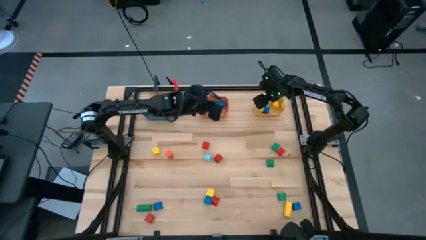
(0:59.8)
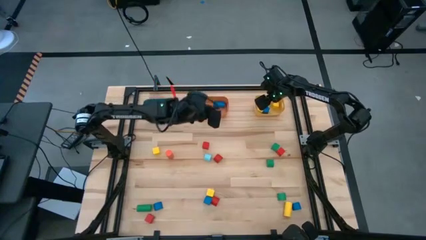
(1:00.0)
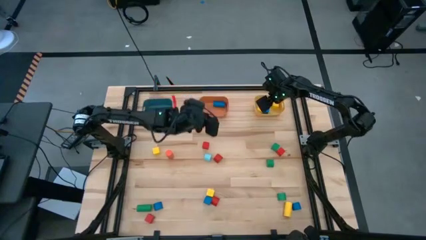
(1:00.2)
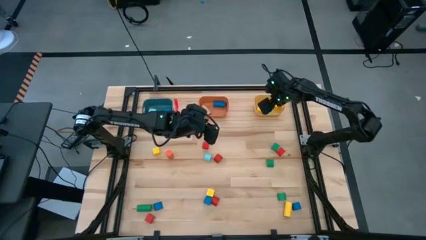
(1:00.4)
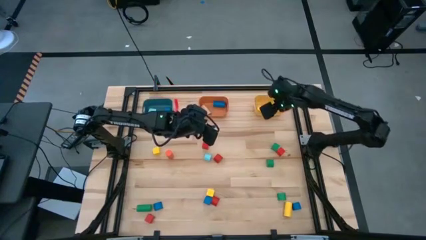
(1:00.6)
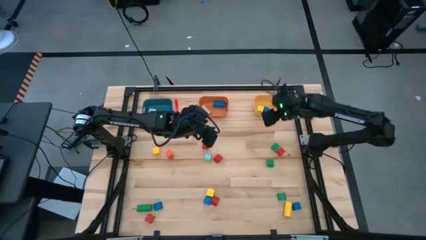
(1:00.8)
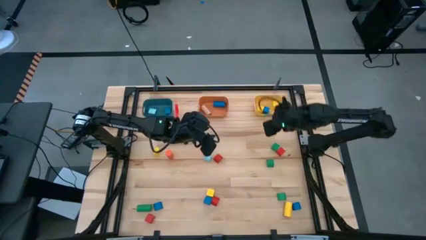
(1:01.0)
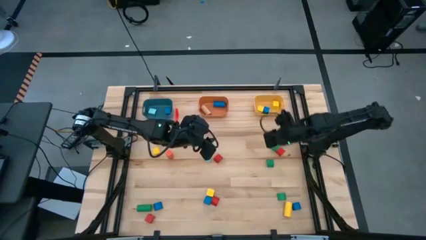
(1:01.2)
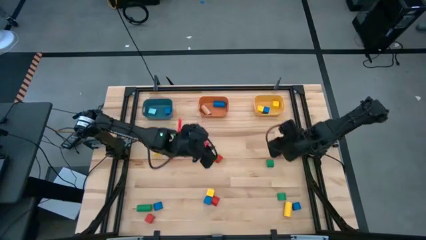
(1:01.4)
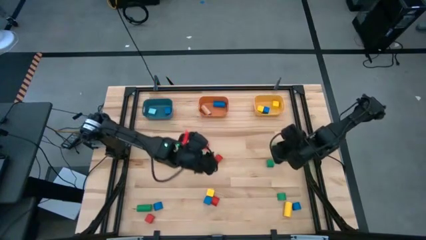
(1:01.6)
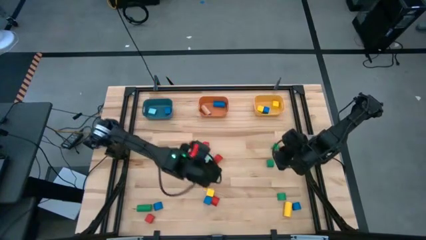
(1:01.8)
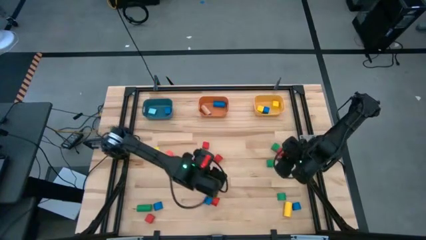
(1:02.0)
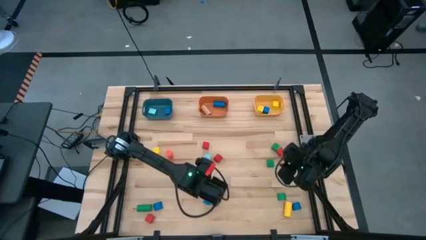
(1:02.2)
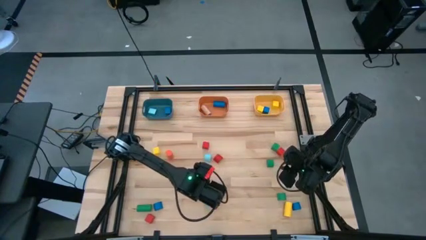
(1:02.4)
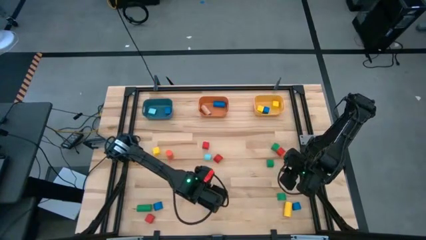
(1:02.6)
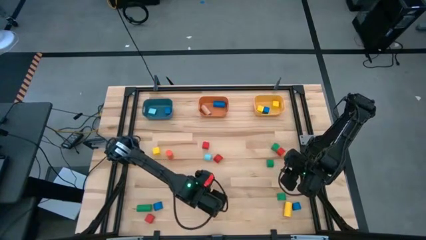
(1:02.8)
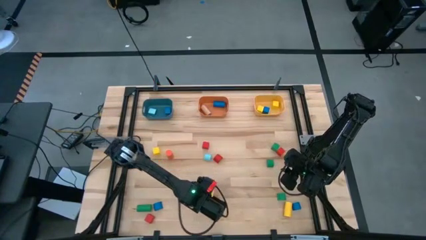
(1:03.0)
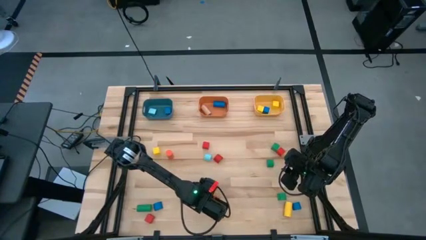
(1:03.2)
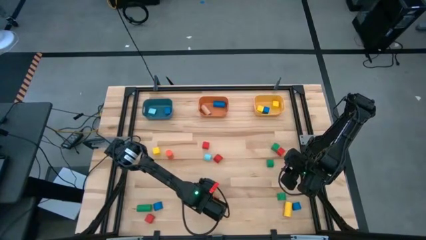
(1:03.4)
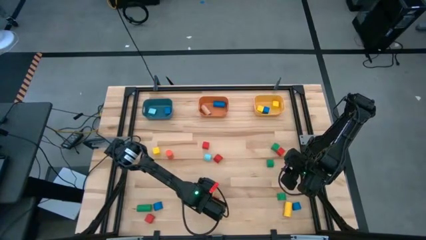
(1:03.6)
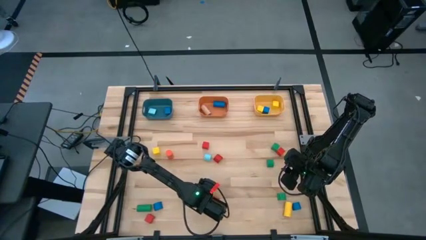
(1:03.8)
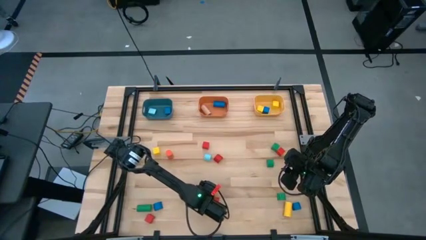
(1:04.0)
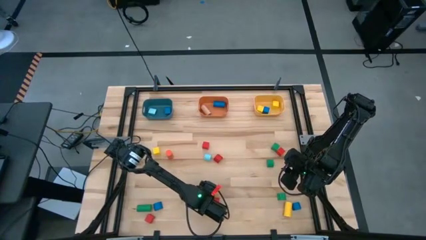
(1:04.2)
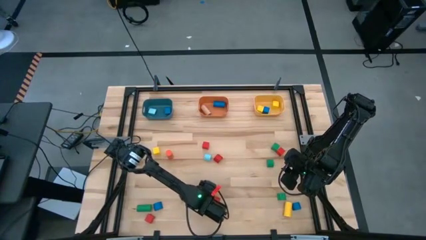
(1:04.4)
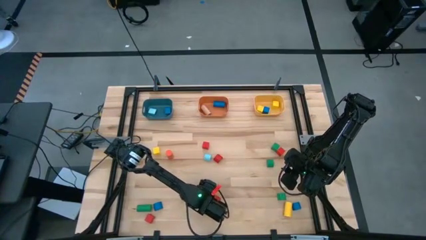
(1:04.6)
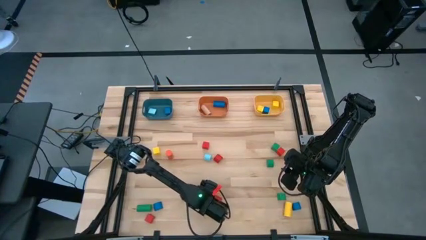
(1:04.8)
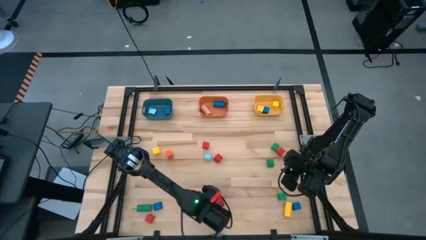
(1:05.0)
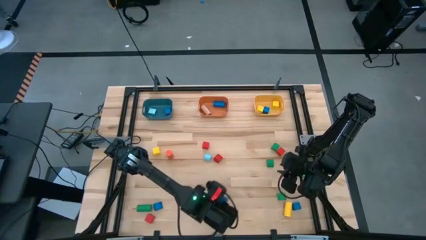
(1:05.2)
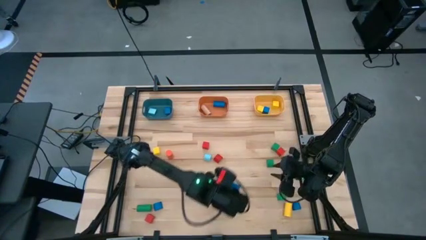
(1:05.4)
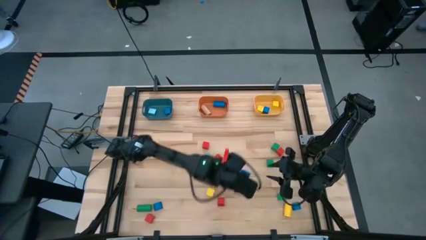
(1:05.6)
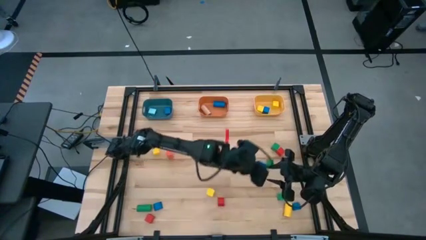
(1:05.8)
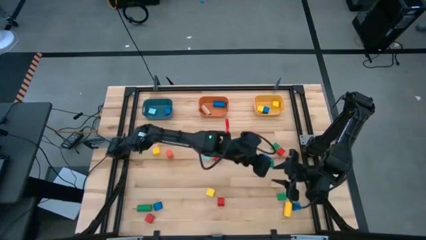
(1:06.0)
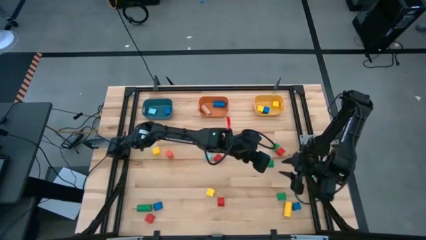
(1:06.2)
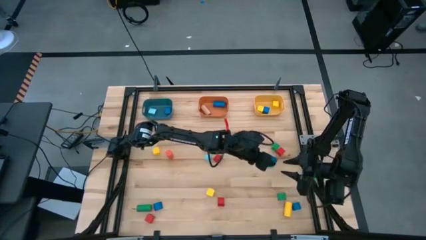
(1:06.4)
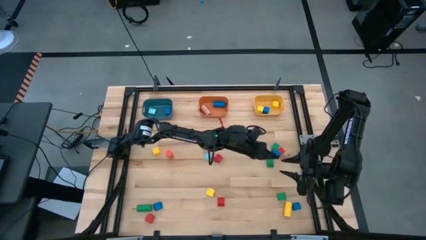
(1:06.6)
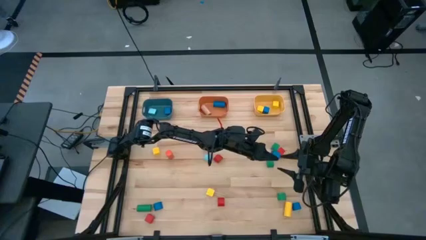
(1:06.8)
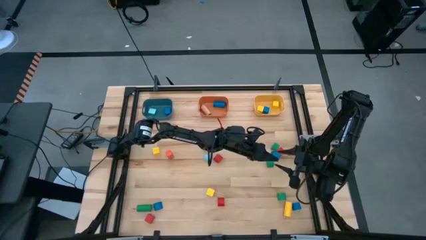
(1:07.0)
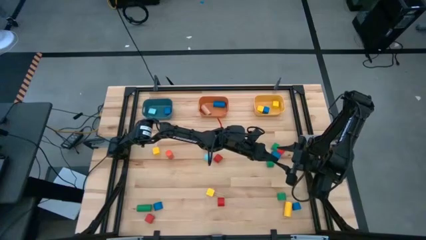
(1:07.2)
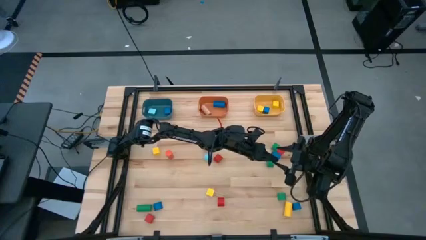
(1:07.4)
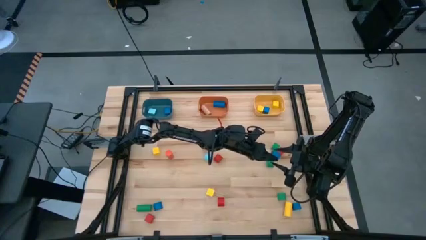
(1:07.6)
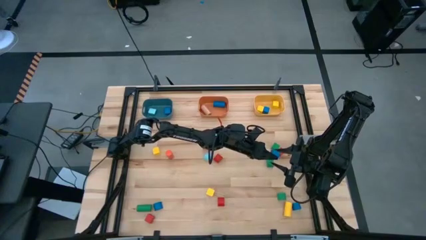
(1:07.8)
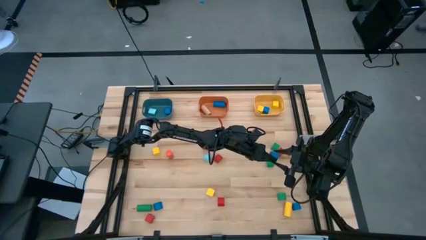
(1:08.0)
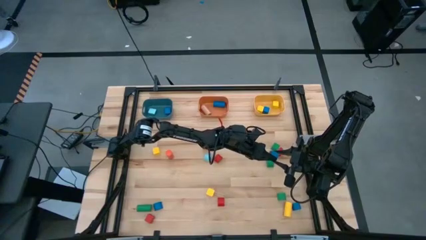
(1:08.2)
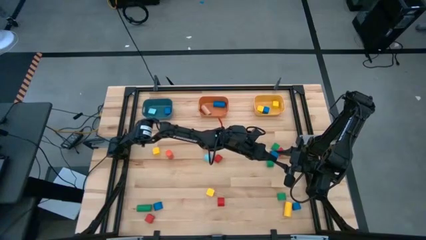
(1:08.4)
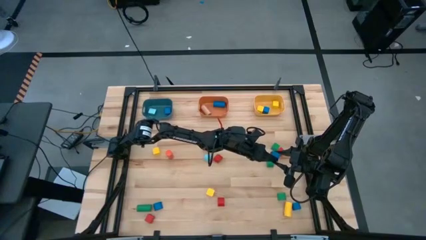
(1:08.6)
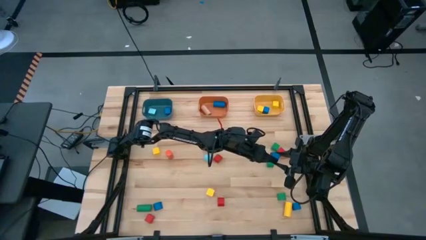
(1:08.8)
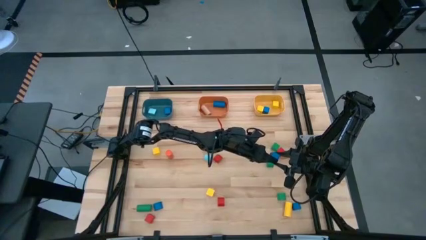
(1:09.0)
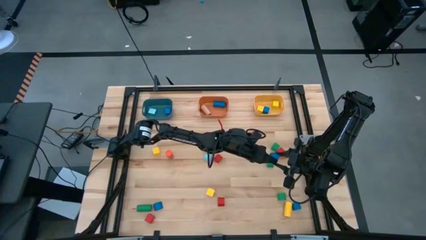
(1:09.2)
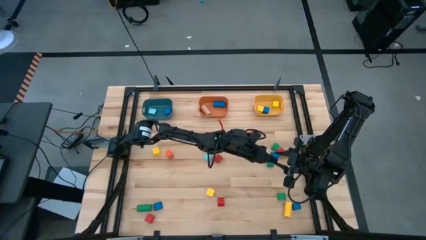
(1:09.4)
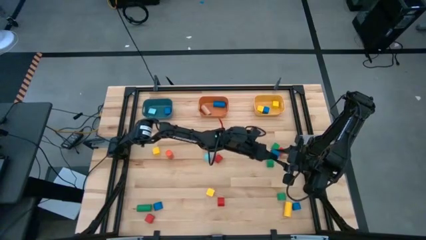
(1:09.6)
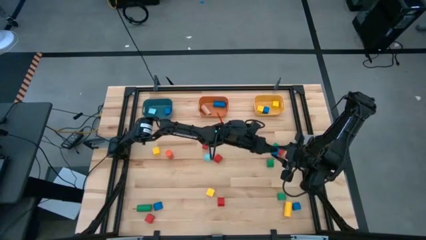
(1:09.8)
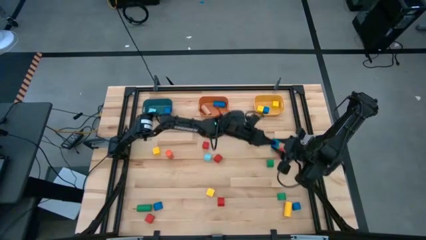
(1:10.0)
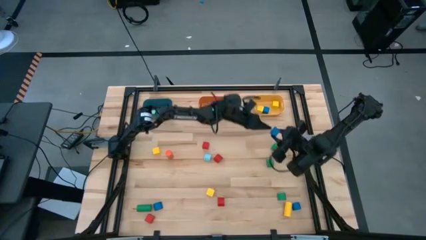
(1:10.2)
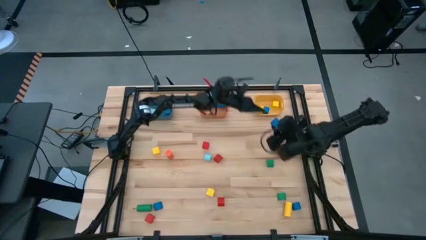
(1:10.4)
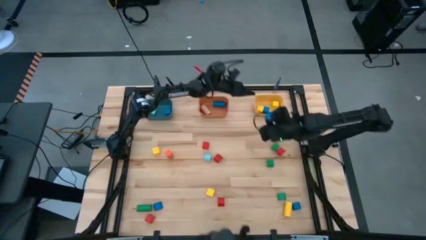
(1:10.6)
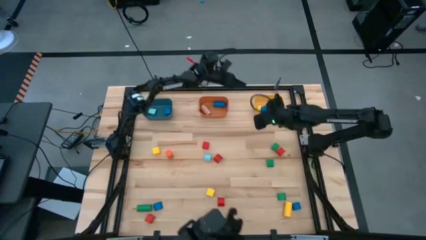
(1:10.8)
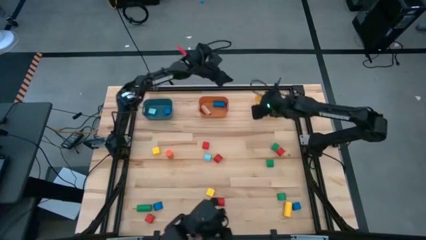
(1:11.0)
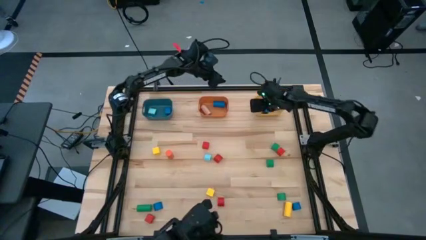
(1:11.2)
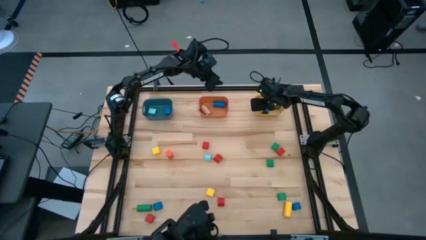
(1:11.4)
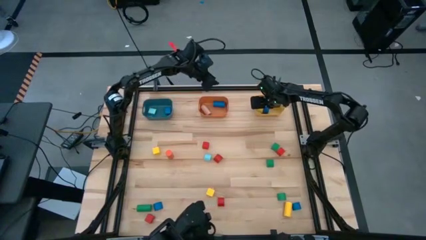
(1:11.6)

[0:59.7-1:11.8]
Task: Sort blocks by size
Put the blue cube block into the yellow bin

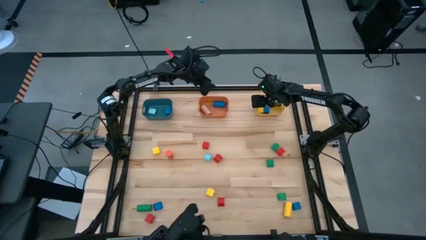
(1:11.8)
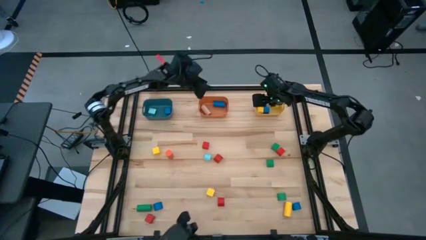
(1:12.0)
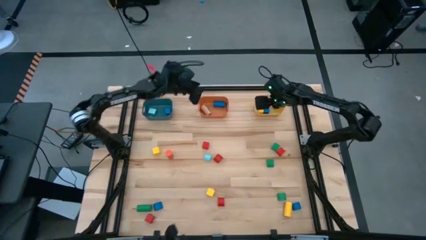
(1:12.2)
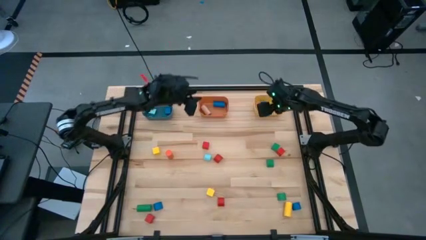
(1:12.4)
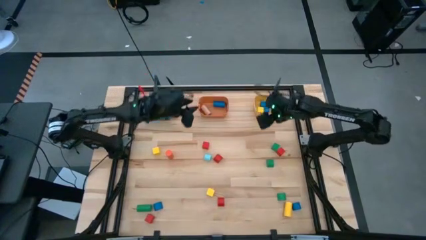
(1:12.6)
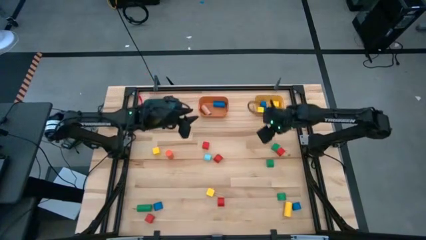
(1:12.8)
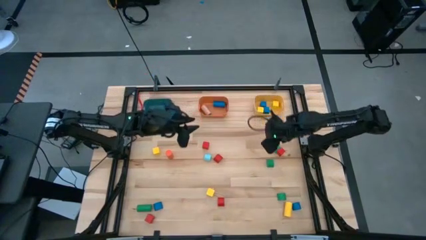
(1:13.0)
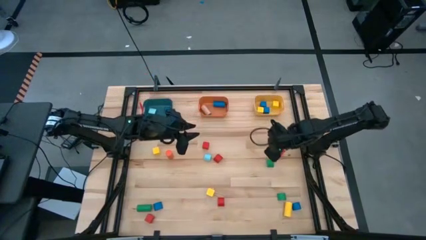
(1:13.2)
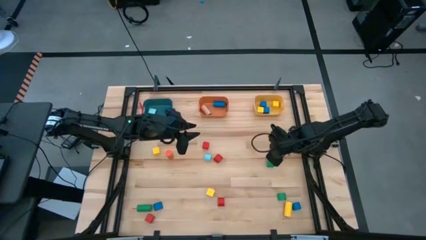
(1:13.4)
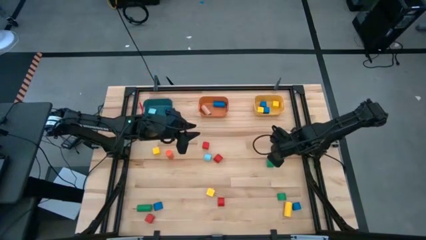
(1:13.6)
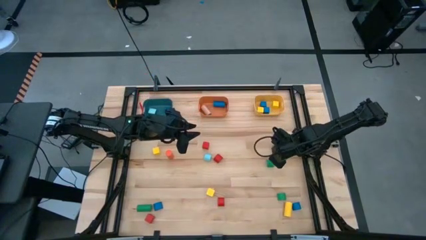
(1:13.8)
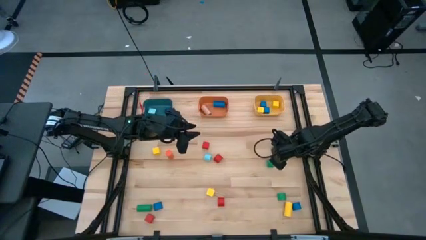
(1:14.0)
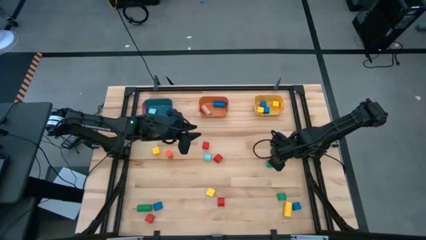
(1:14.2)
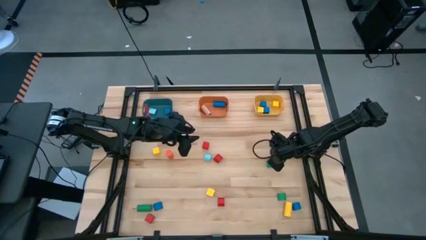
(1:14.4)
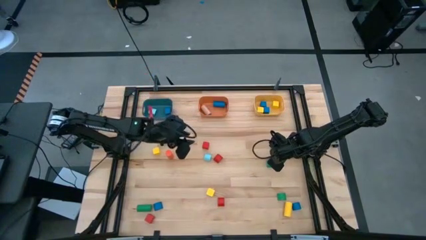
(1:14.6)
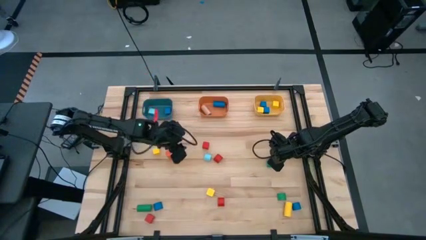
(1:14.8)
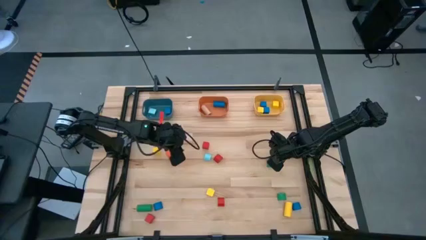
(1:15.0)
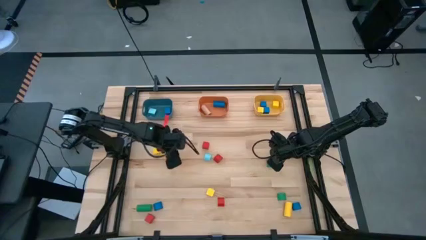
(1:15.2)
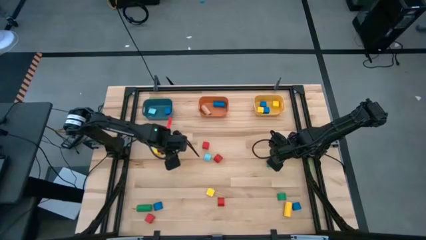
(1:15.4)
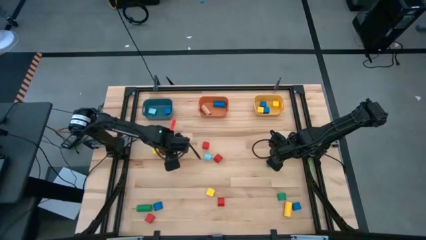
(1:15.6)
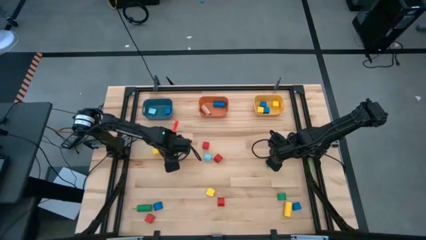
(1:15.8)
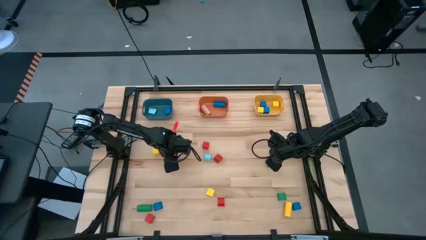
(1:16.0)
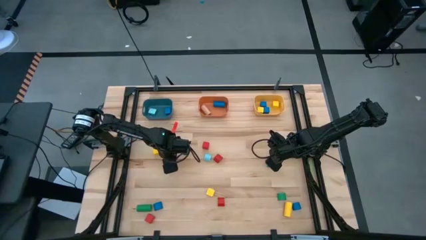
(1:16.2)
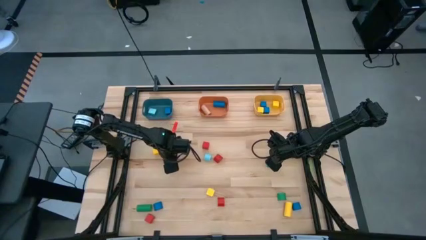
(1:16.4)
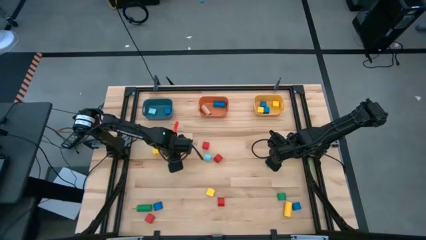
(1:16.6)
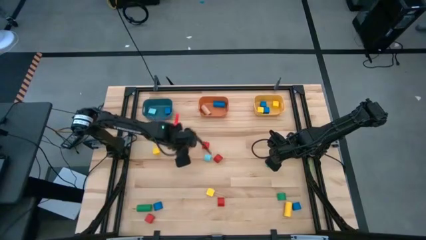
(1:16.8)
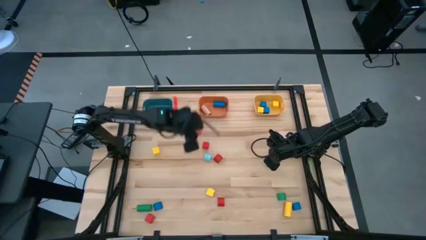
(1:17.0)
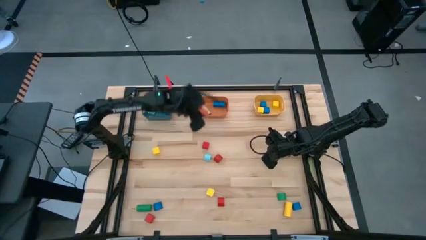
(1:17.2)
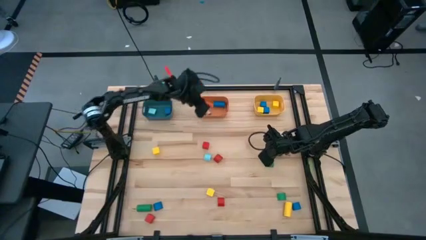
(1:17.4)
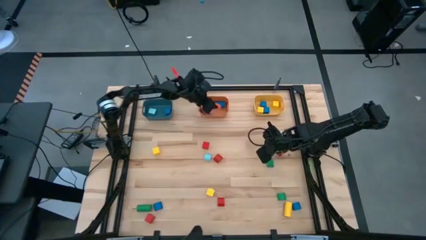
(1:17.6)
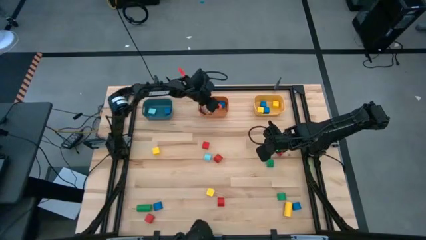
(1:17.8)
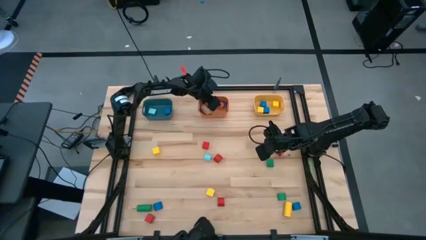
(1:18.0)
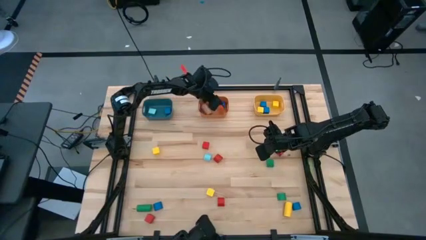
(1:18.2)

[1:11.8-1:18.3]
Put the orange cylindrical block into the orange bin
